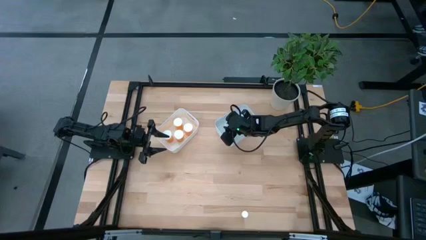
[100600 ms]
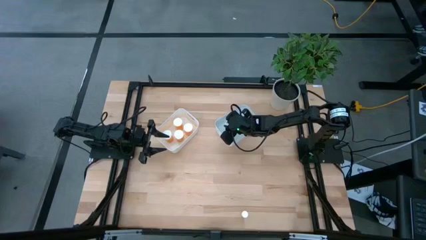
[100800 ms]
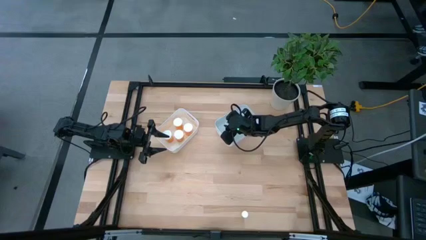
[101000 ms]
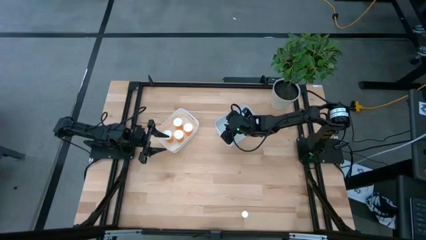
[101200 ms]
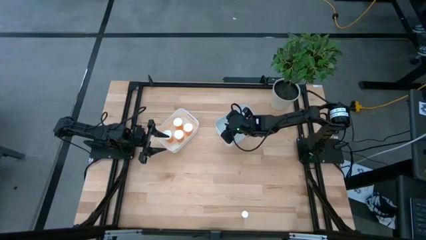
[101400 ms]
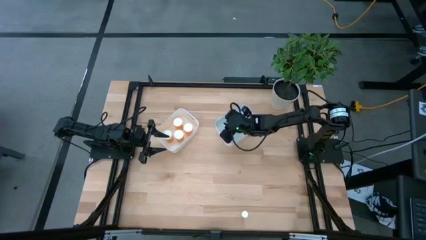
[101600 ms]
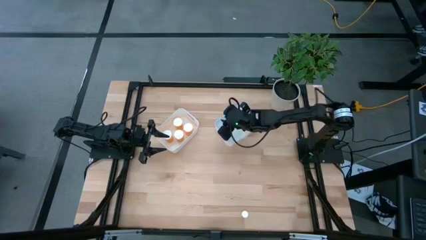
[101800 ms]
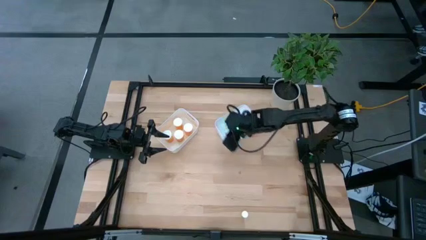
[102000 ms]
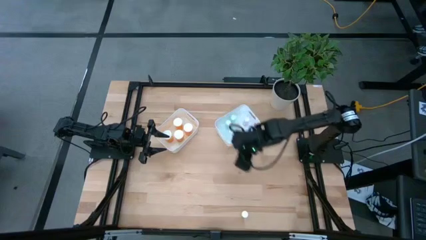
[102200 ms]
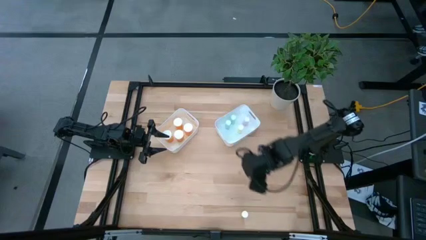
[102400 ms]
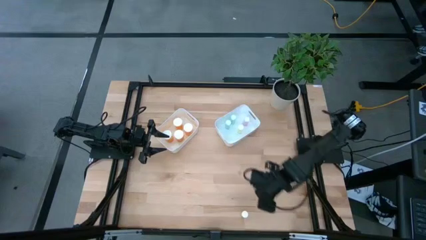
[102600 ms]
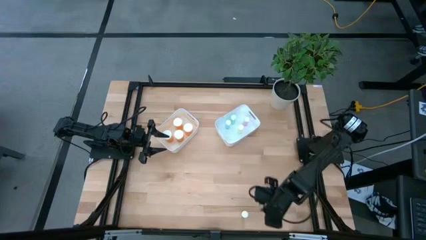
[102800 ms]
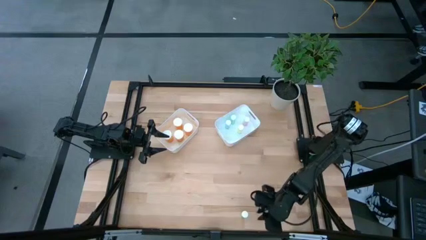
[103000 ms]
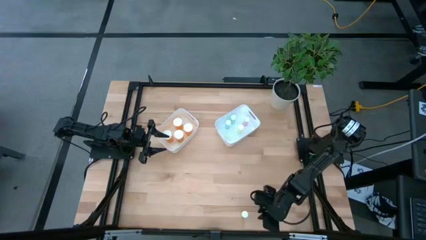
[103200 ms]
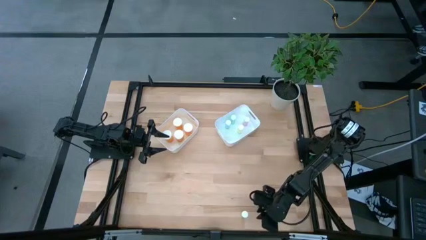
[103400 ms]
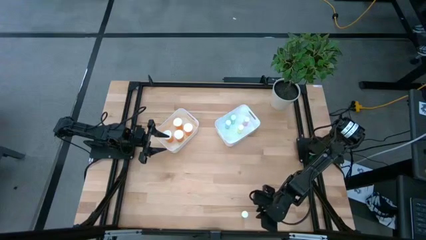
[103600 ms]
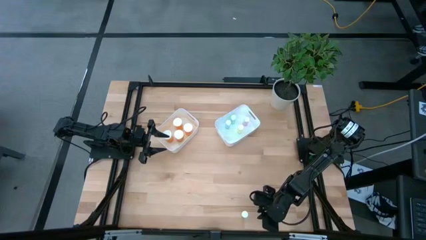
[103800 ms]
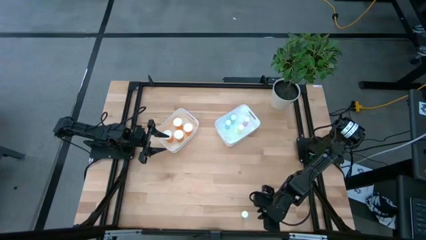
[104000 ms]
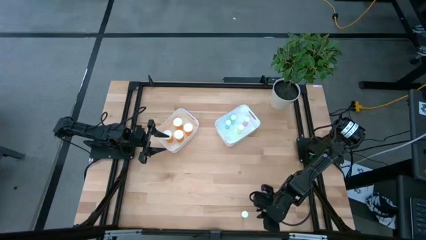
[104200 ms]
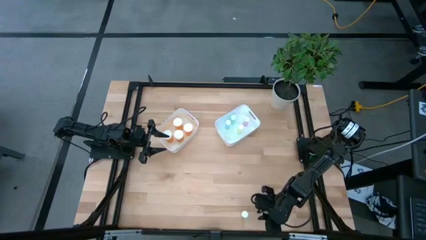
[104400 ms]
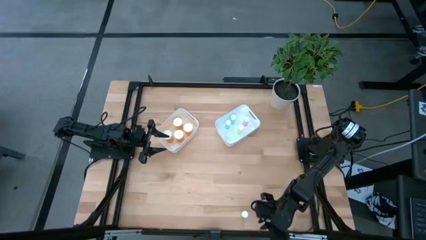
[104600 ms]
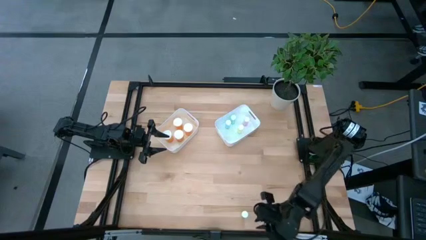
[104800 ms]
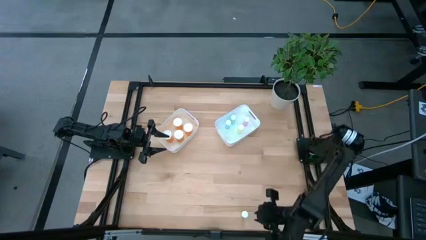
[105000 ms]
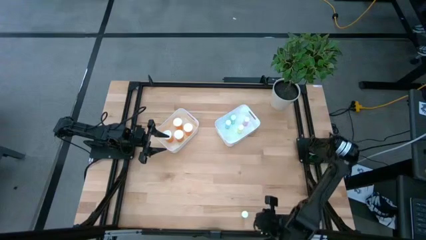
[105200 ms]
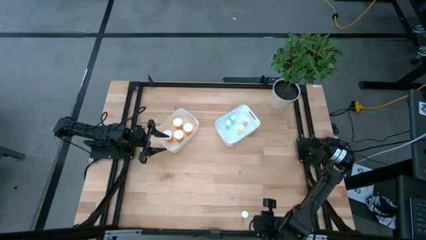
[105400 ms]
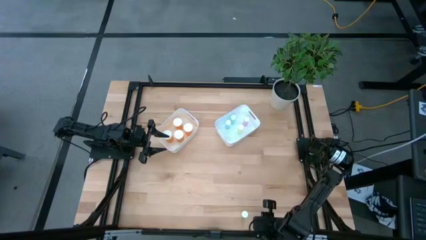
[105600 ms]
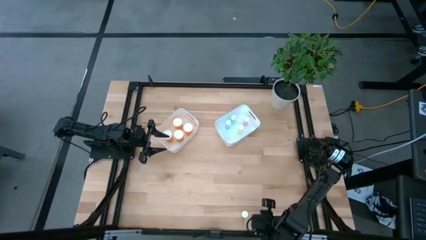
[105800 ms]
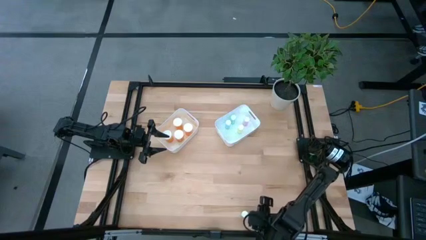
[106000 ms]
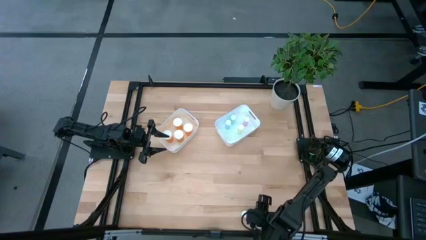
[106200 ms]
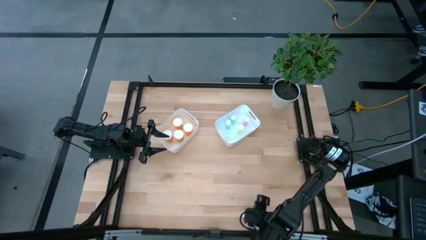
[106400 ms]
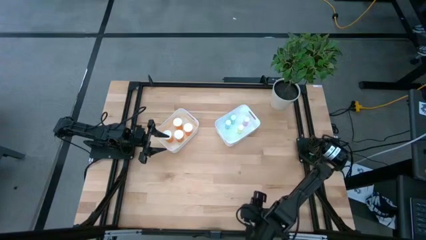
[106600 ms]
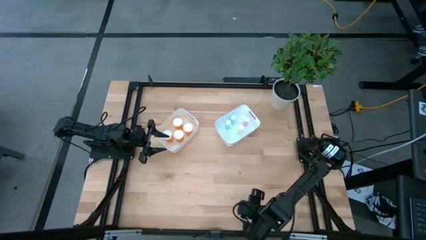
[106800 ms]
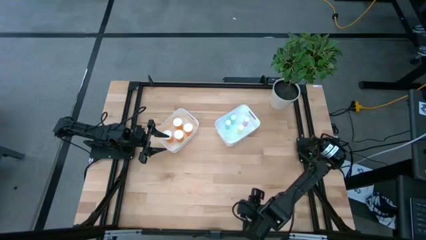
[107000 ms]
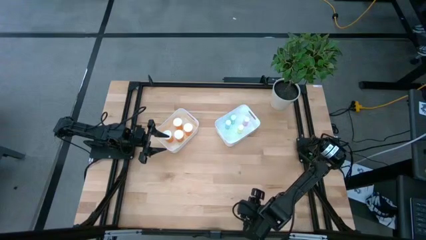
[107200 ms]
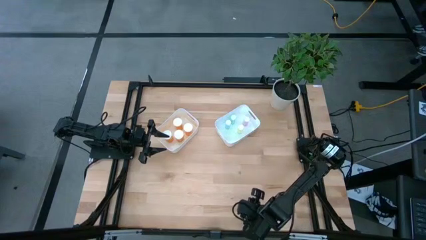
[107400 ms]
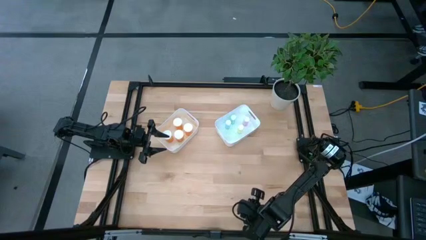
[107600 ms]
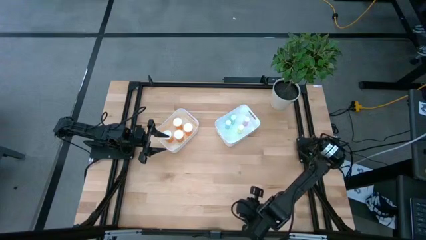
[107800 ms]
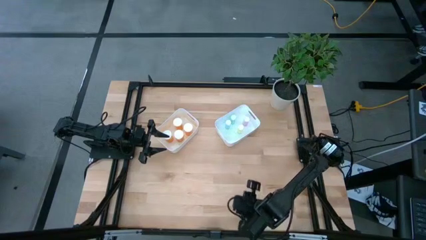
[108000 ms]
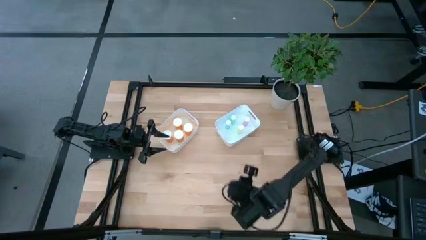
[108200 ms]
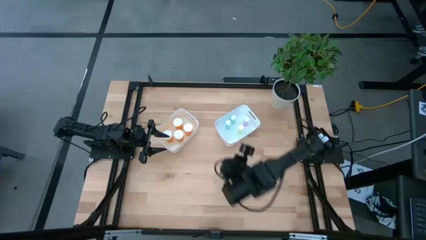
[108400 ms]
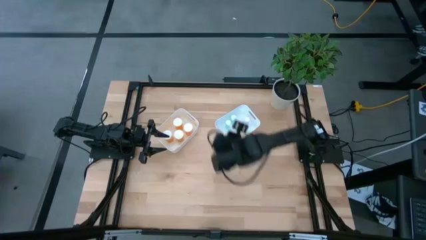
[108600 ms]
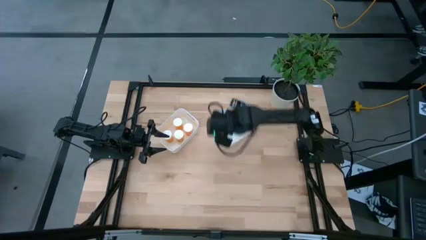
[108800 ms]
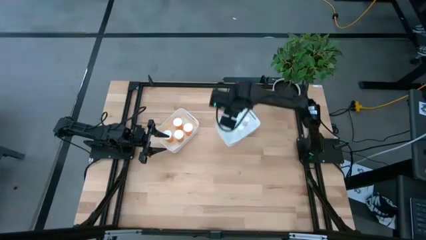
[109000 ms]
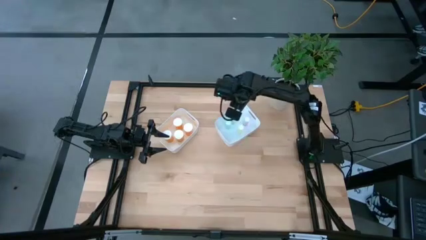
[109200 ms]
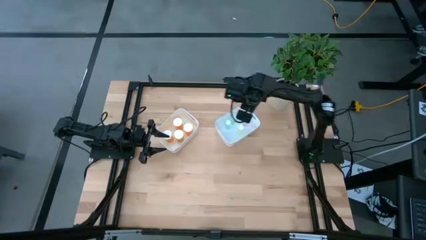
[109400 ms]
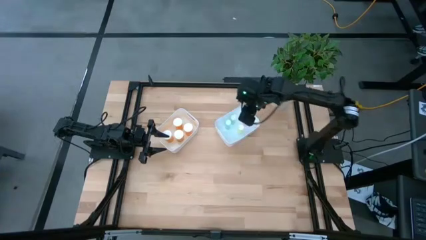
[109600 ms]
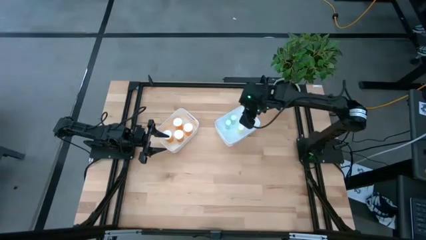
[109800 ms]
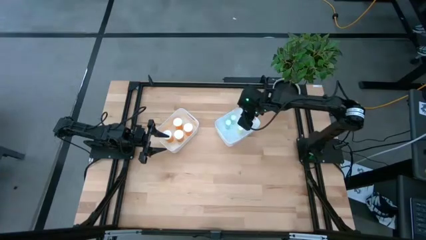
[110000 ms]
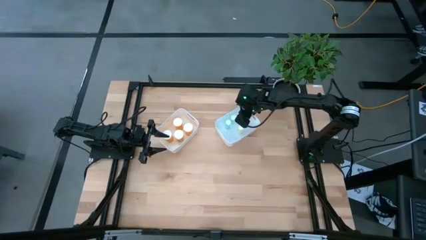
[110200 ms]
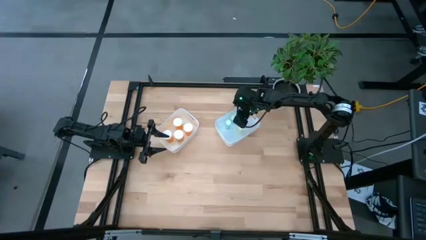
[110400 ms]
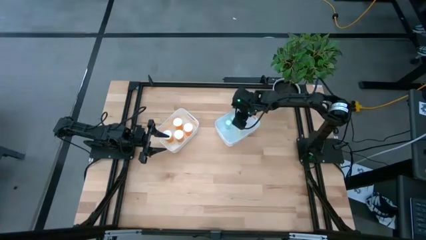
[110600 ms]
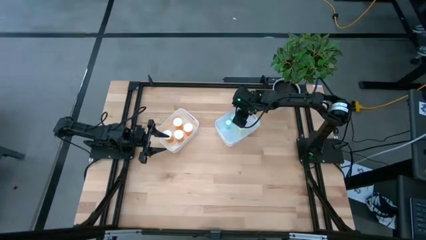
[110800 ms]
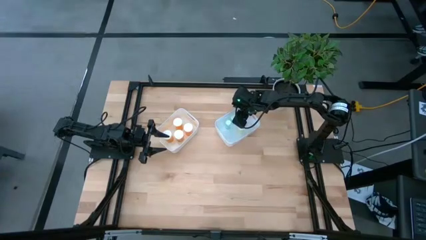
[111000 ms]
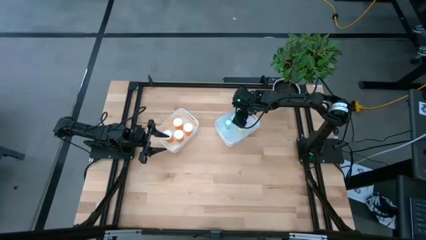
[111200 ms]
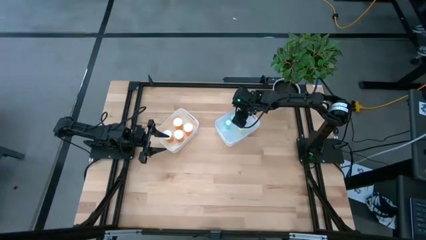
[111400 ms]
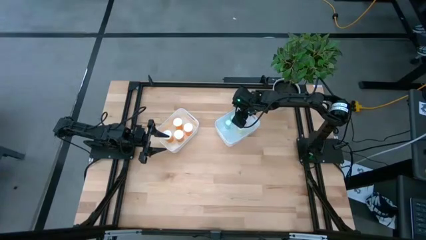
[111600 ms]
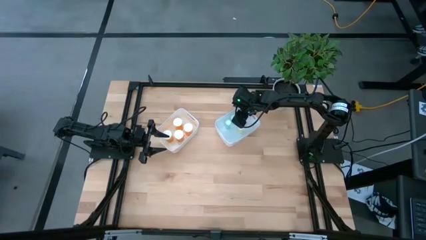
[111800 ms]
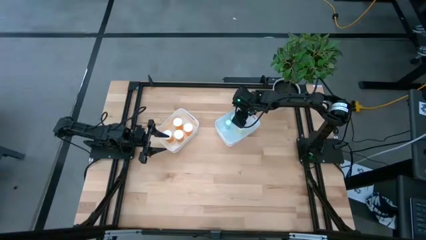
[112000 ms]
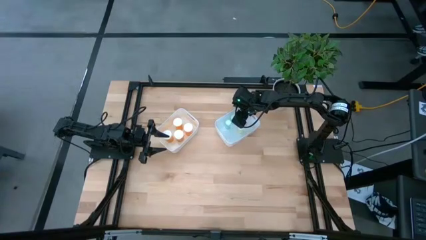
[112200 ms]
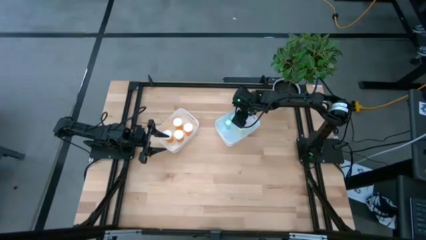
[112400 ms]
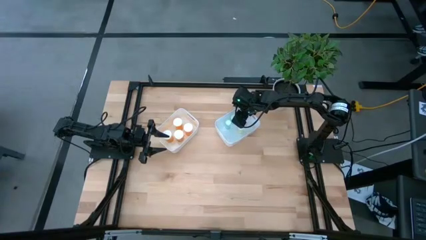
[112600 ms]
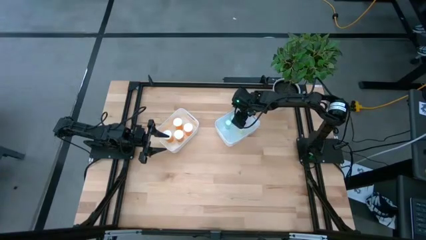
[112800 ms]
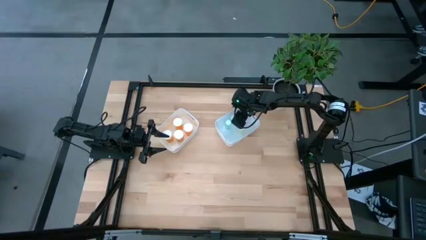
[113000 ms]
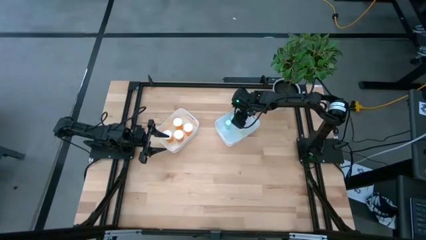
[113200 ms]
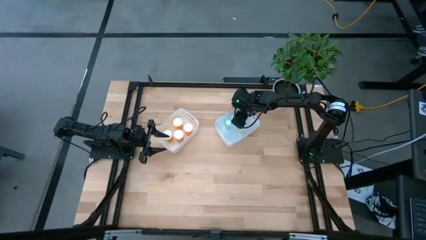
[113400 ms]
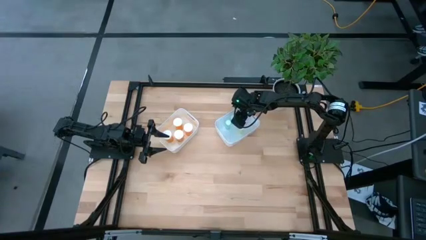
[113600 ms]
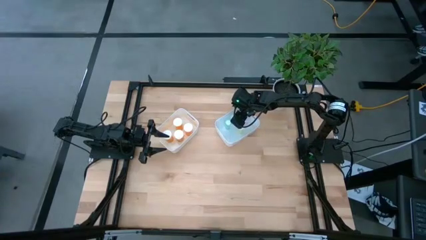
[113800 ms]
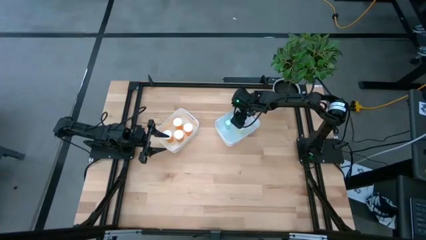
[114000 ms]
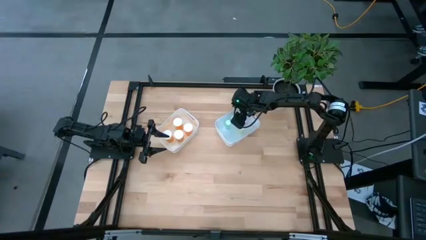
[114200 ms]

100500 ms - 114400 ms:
Task: Pick and place medicine bottles into bin by pill shape (circle, oval)
Put the yellow tablet bottle into the right white bin
